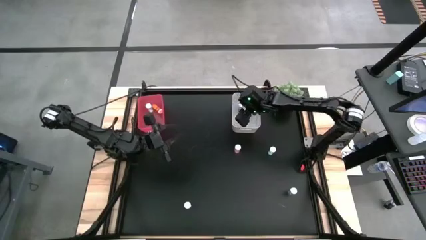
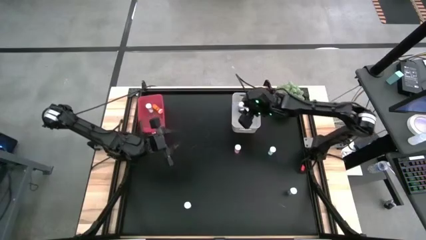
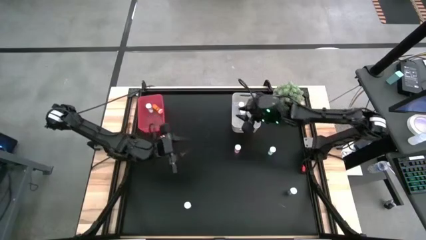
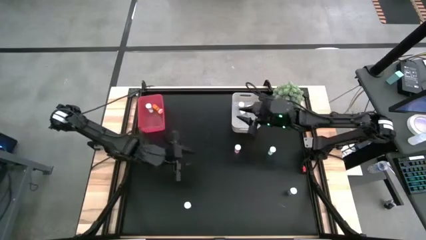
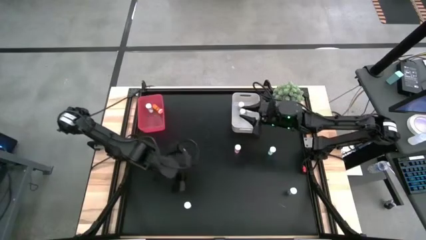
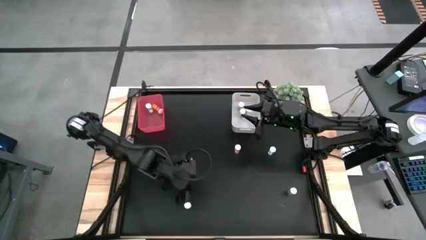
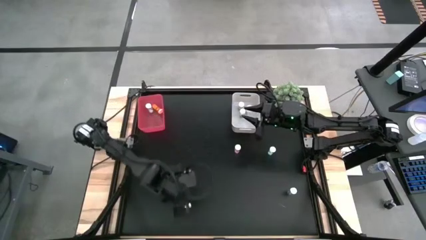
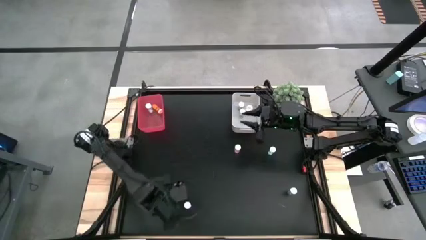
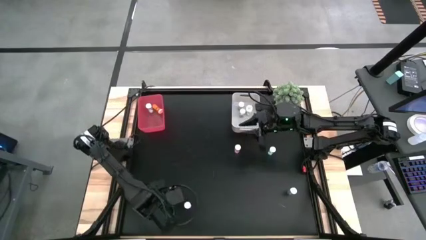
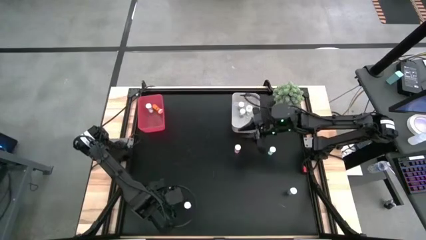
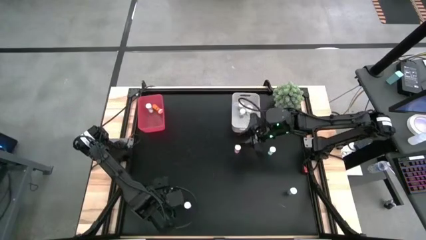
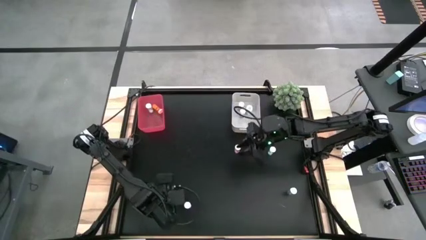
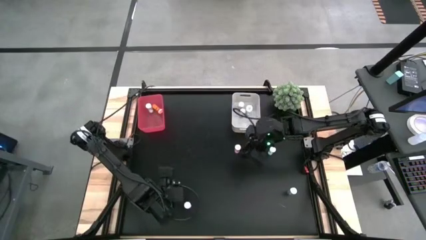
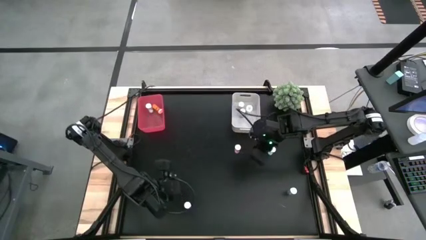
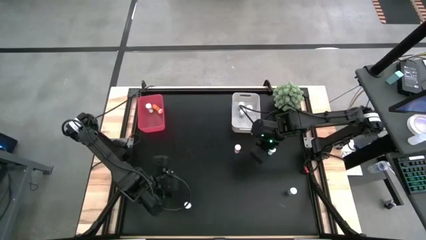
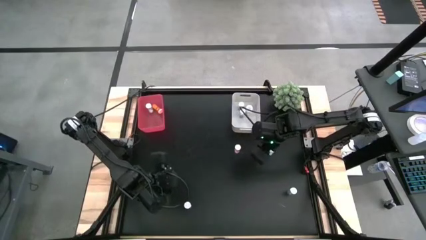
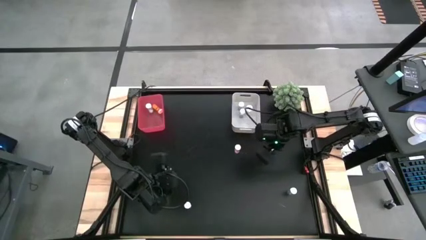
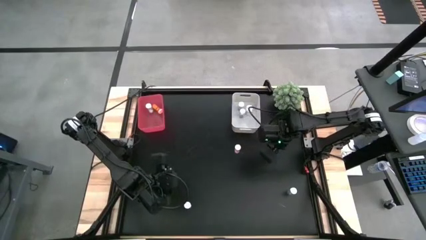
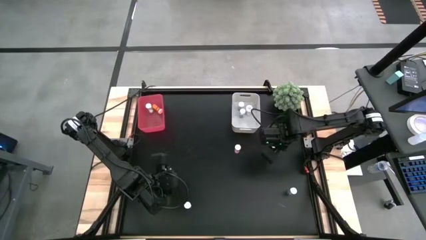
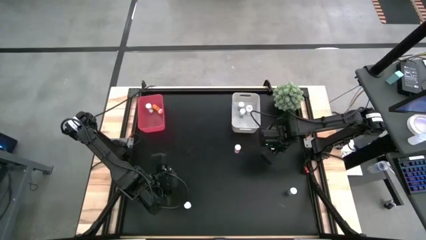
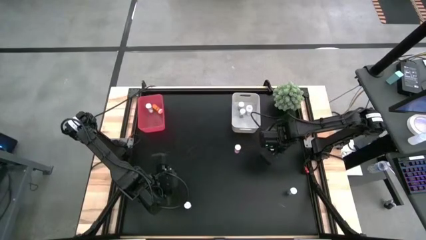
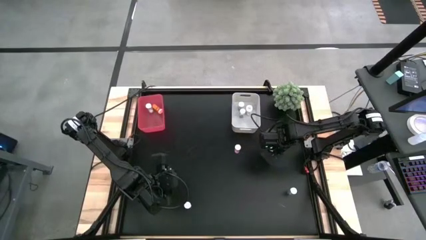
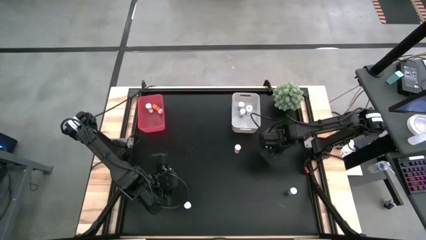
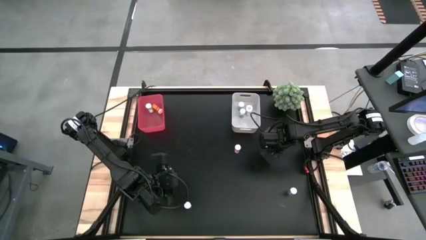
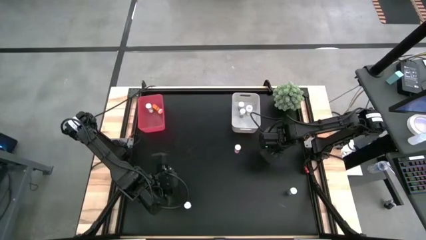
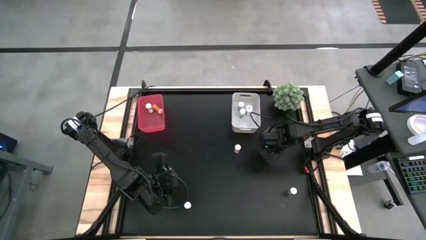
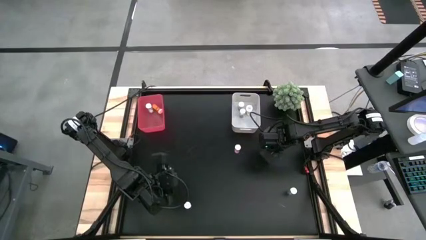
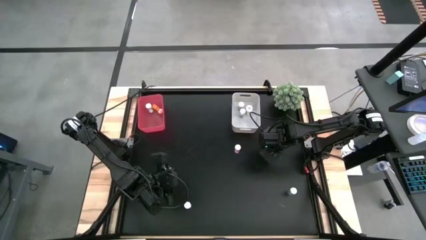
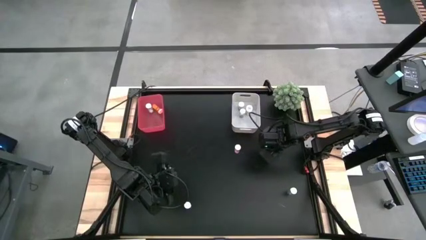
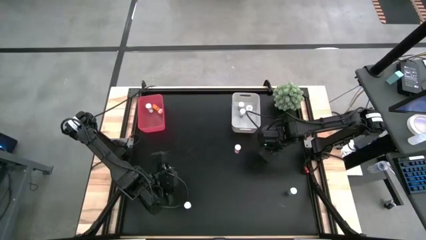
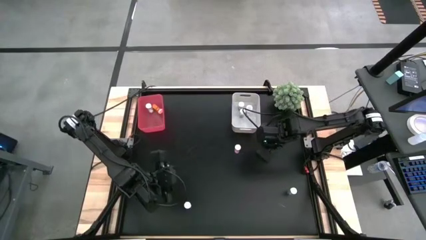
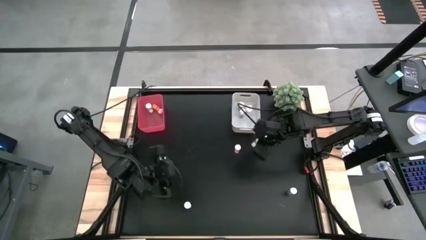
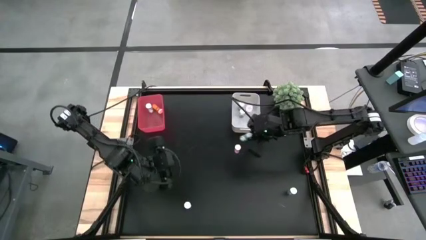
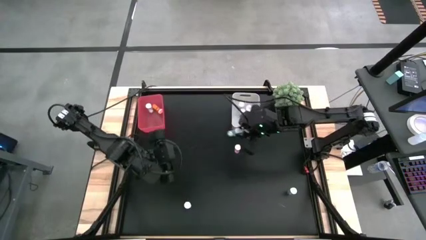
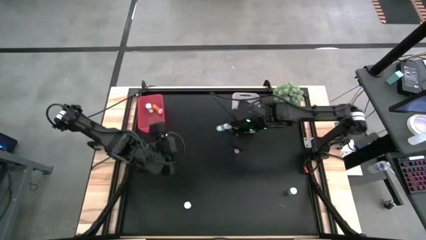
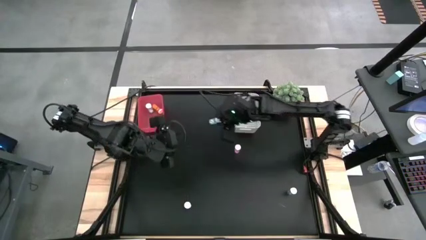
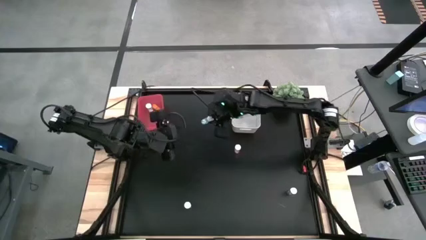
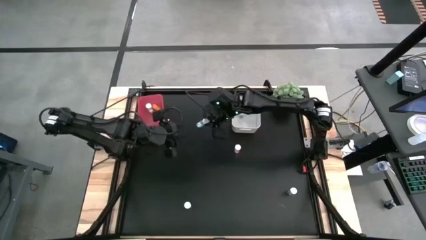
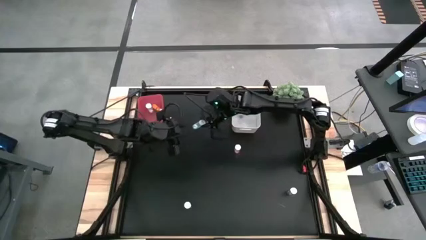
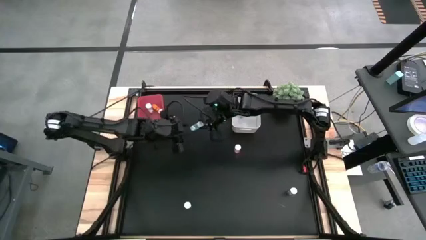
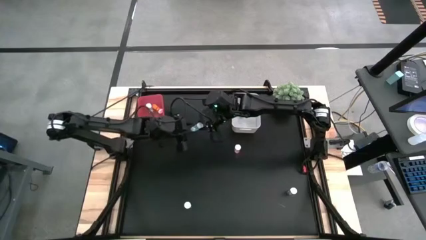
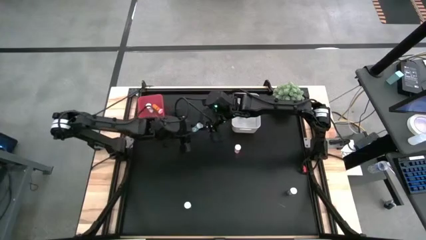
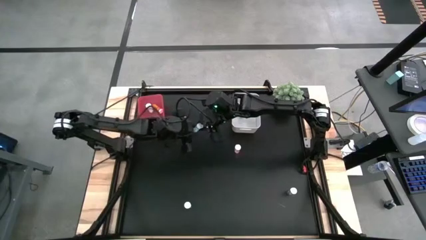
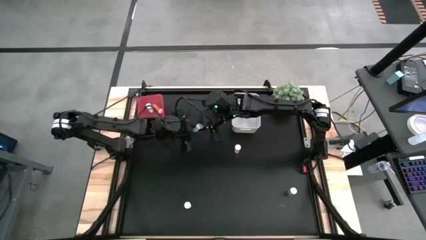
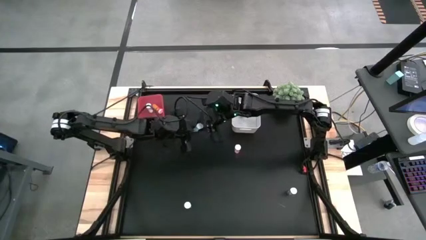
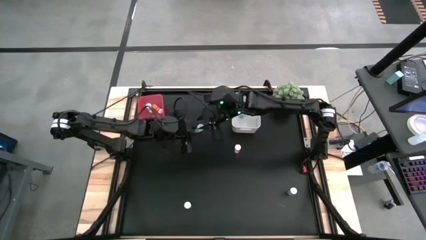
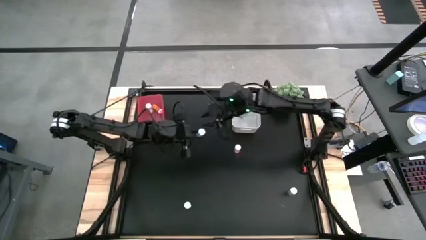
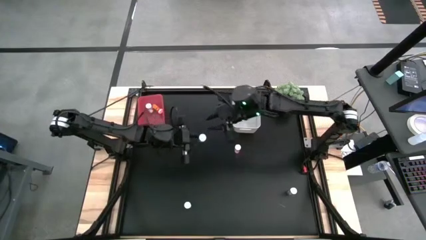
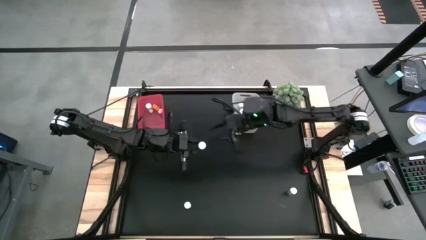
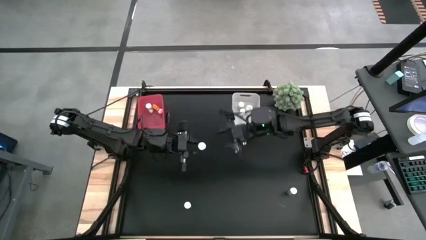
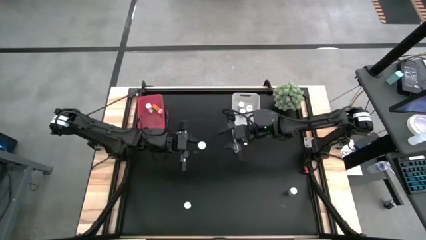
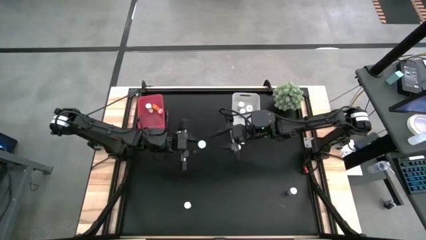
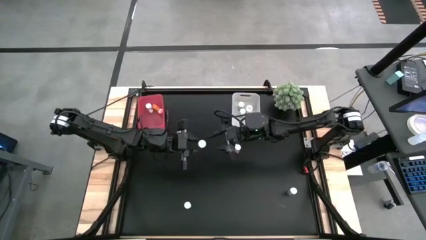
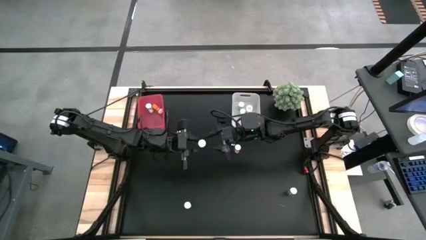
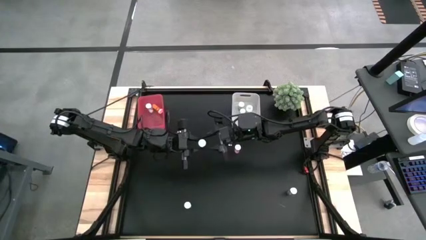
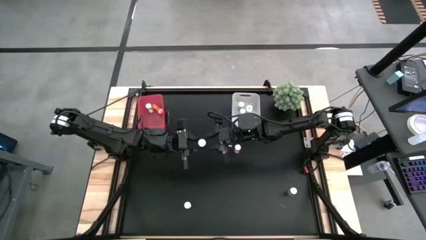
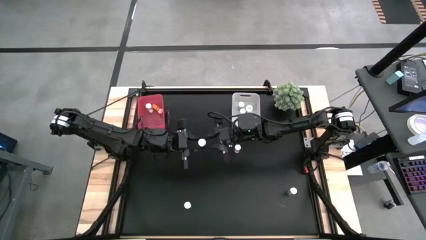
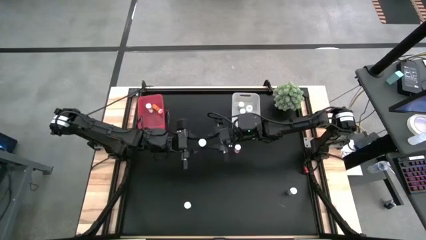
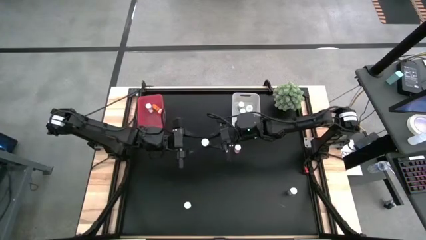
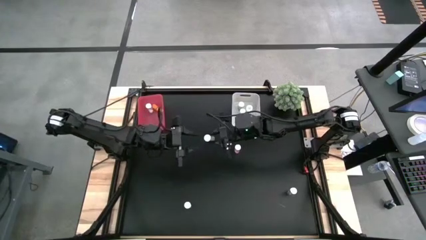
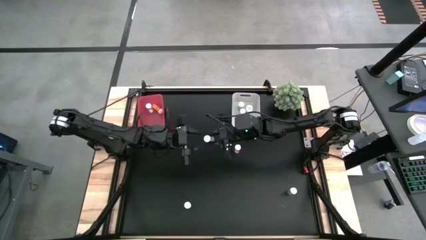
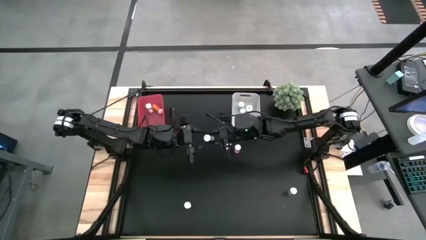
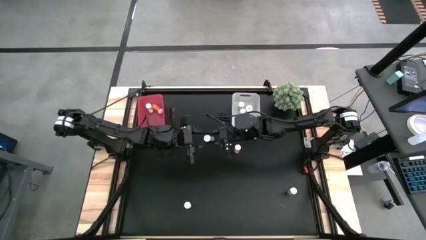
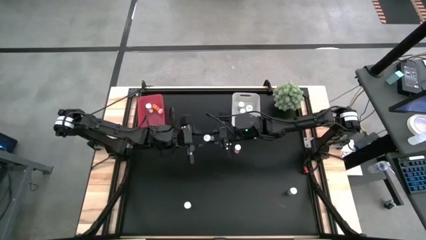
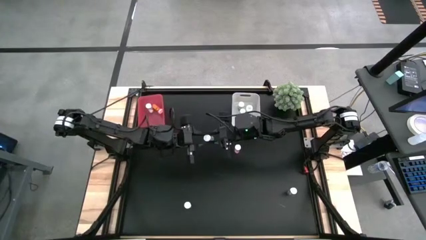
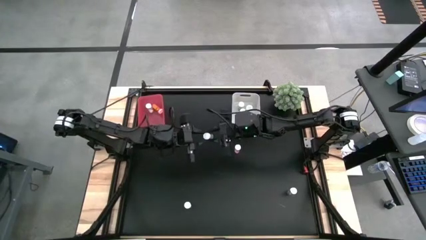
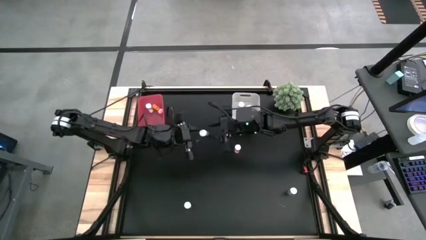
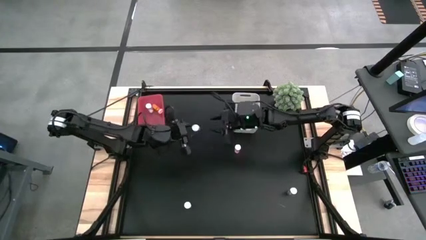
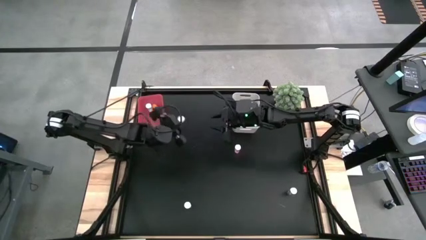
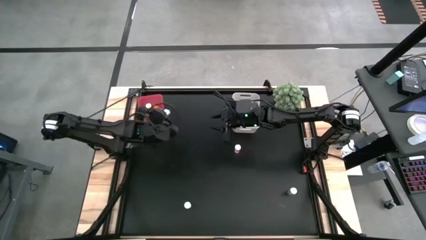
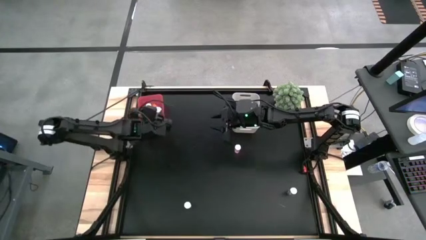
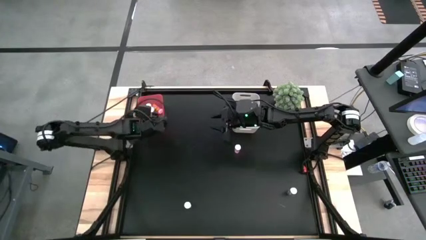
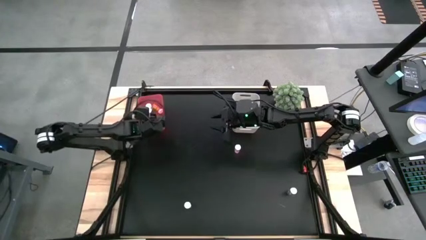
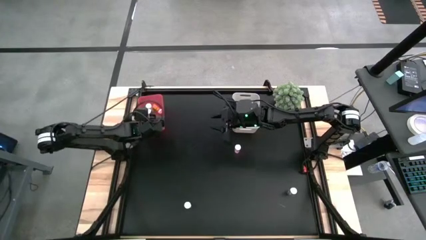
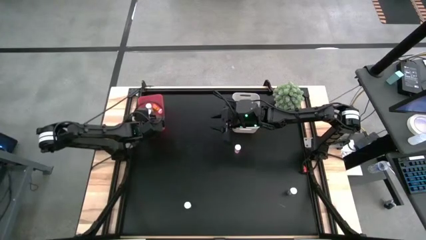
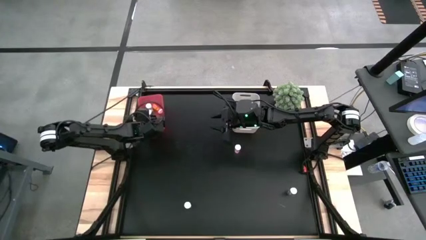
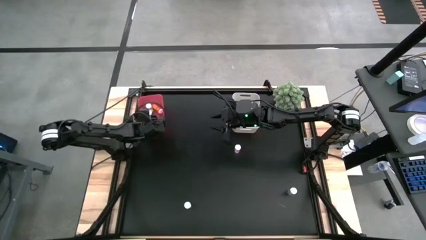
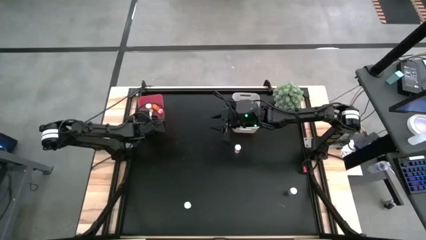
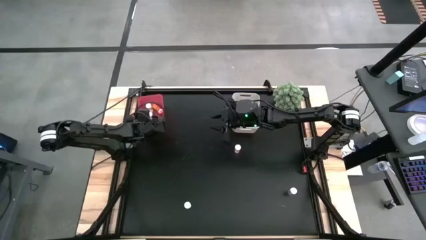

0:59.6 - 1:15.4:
Task: Pick and place medicine bottles into bin by pill shape (circle, oval)
Put the green tablet bottle into the red bin
